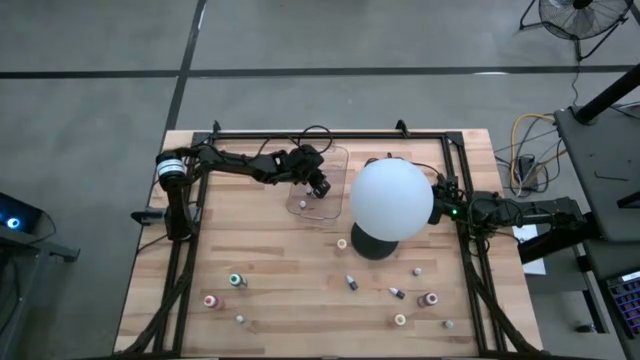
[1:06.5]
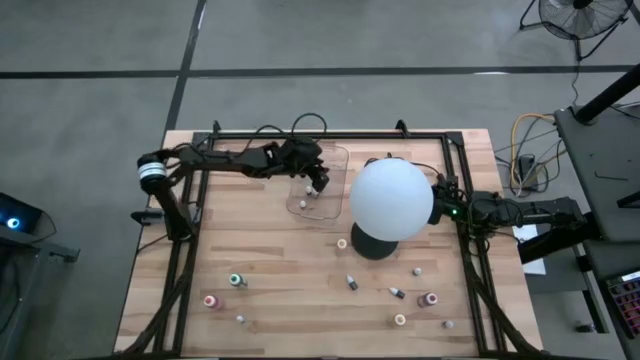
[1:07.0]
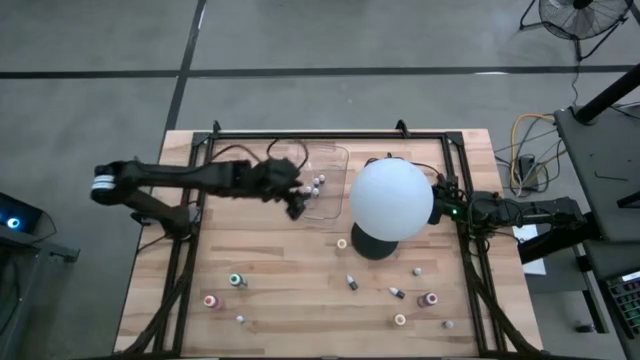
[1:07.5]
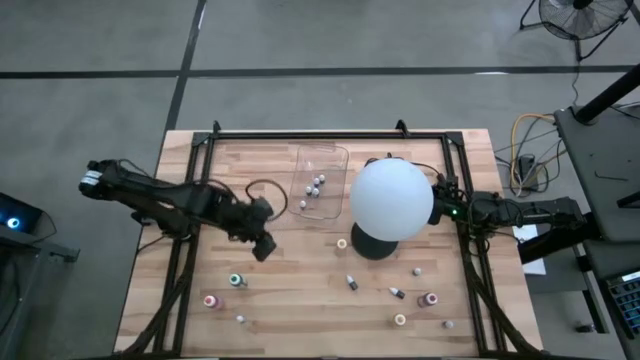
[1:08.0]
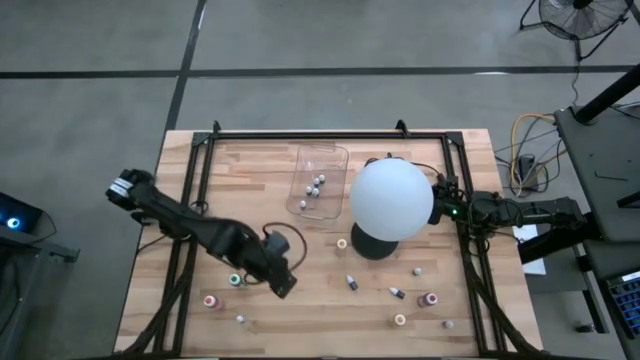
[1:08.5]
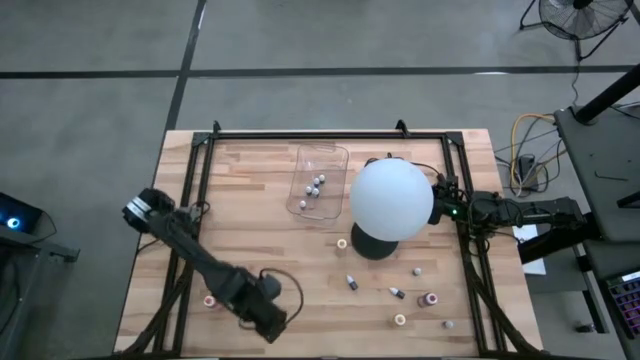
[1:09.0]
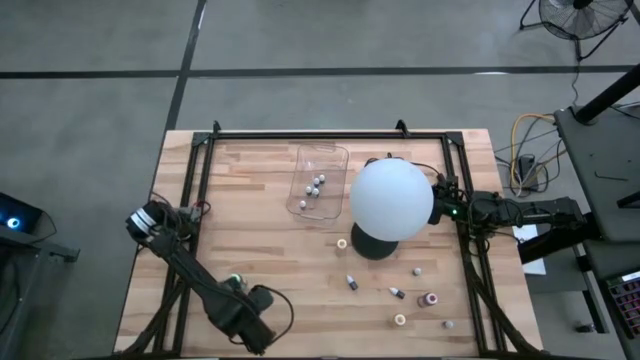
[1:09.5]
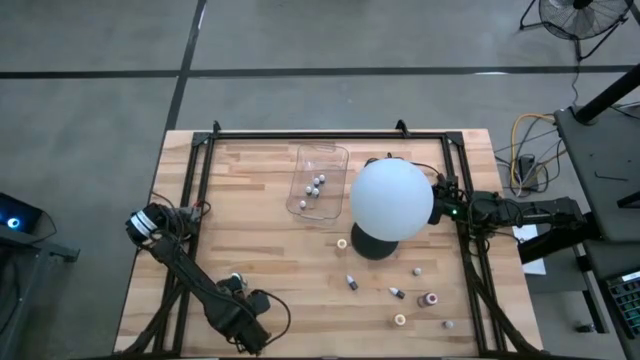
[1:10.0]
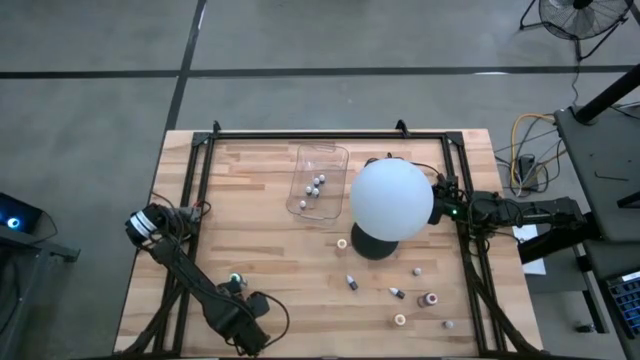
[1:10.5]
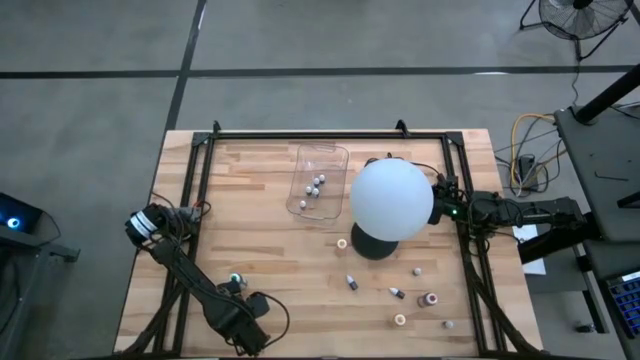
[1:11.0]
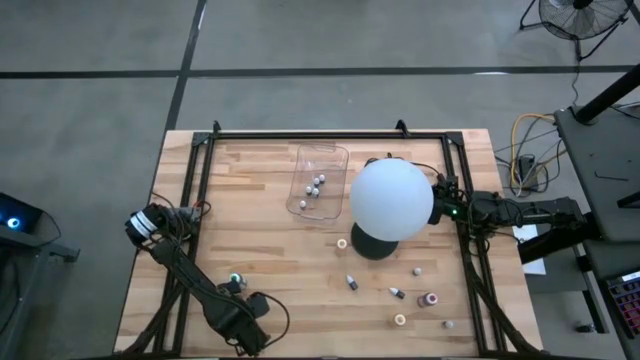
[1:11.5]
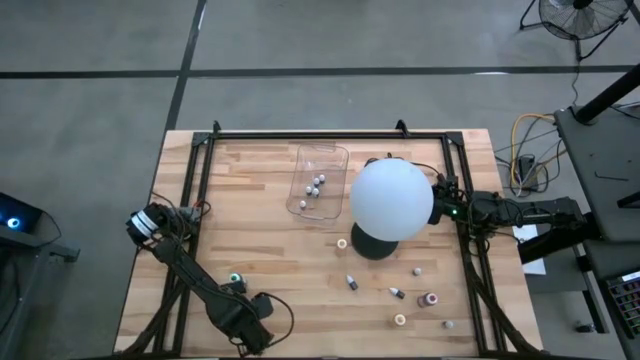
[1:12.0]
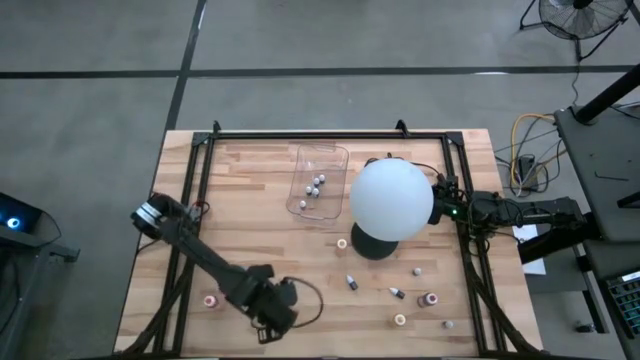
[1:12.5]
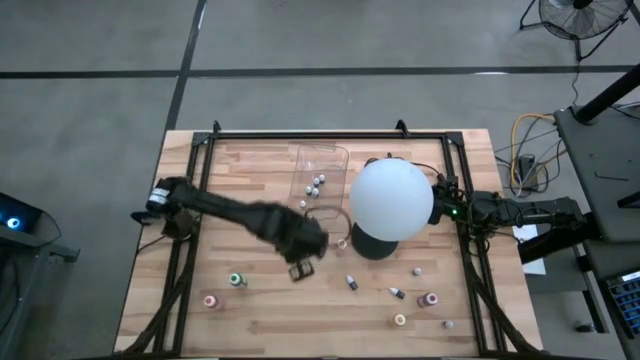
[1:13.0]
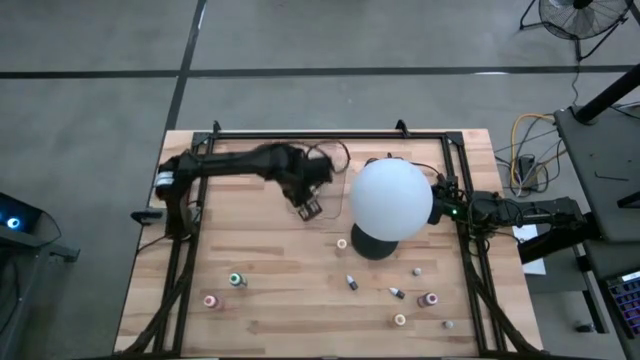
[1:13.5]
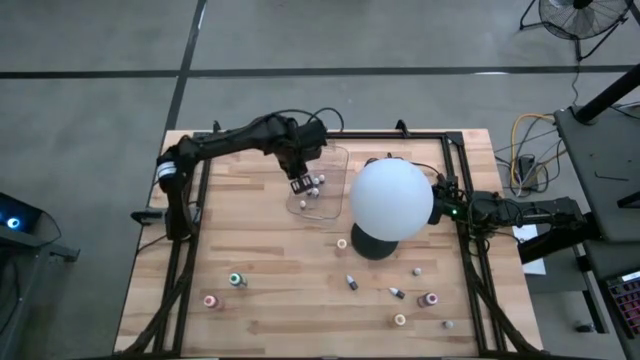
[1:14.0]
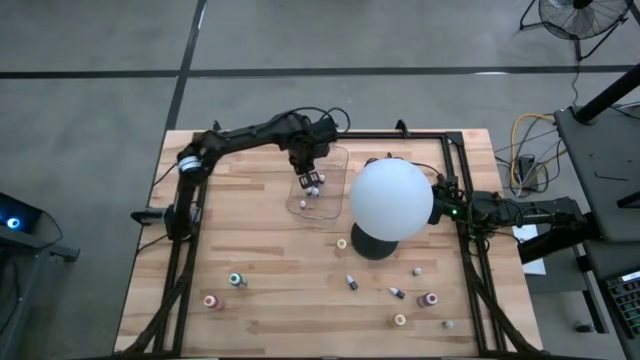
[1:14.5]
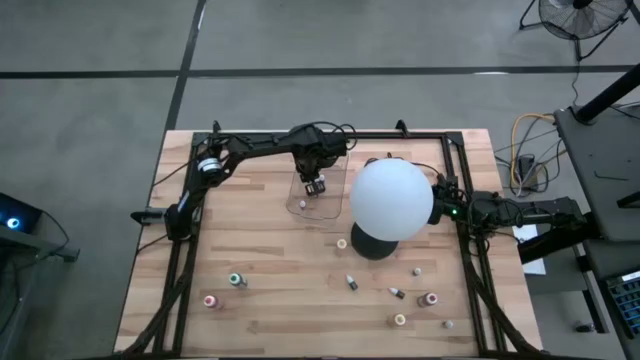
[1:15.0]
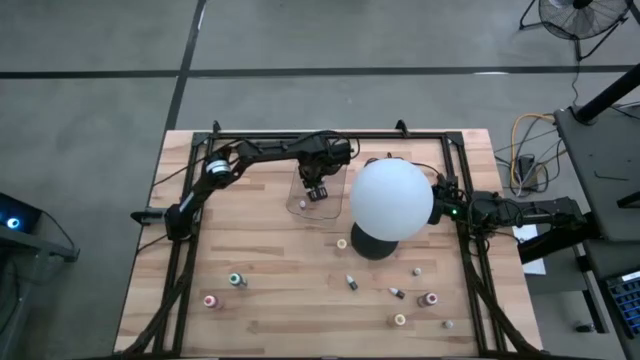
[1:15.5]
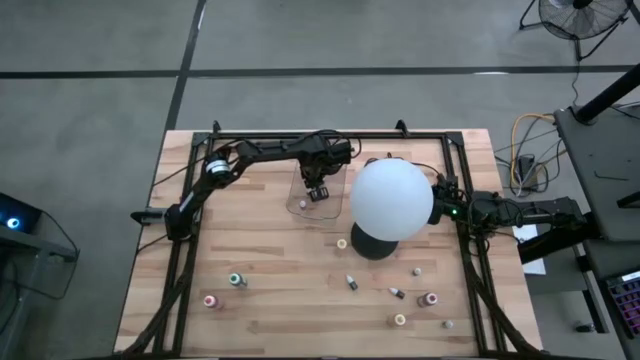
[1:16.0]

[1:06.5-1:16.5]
Task: Pick & Place food coloring
Put the small white food coloring bottle into the transparent bin

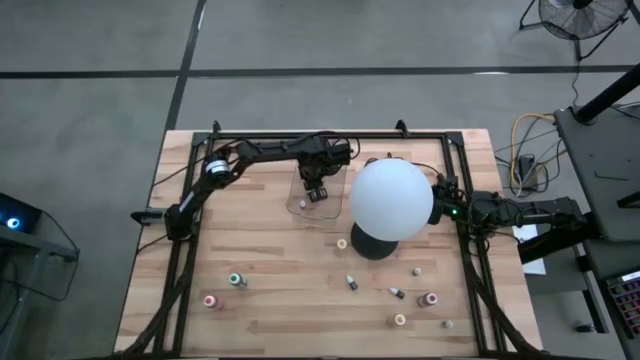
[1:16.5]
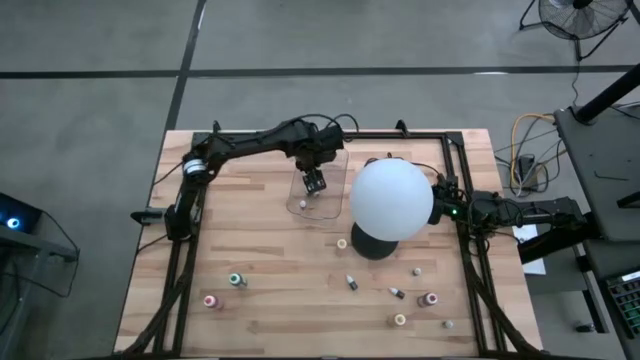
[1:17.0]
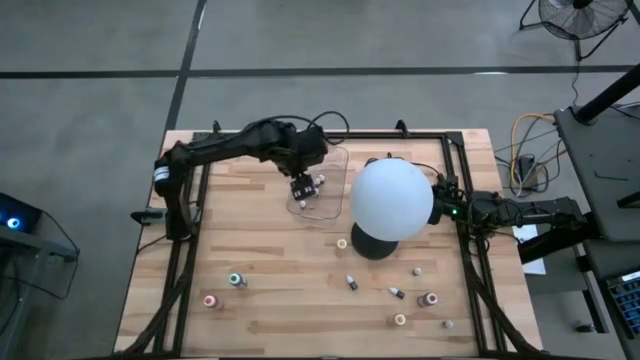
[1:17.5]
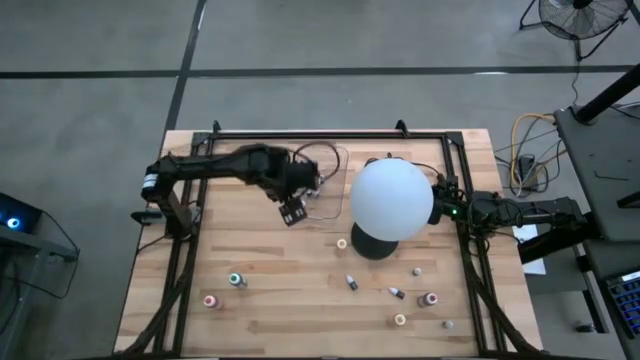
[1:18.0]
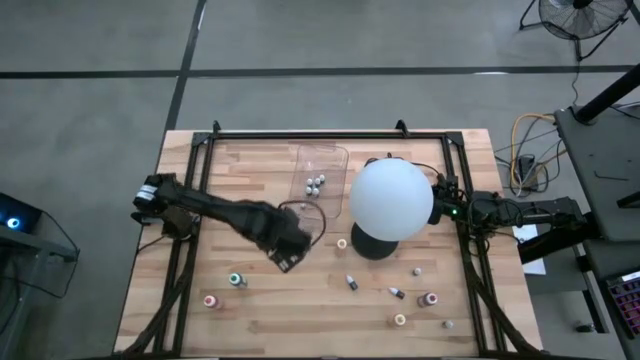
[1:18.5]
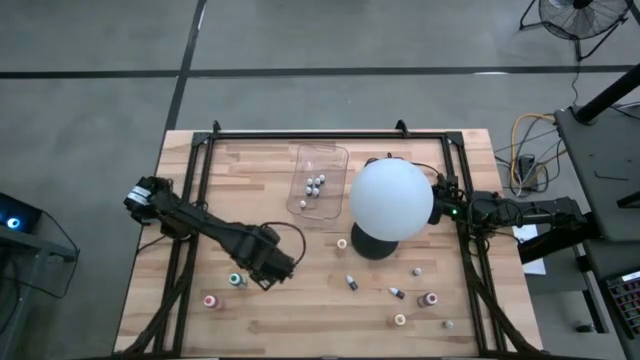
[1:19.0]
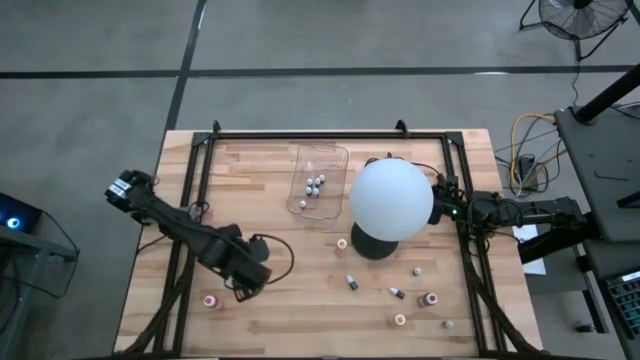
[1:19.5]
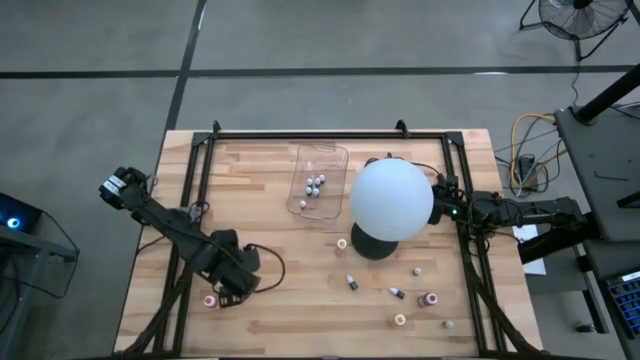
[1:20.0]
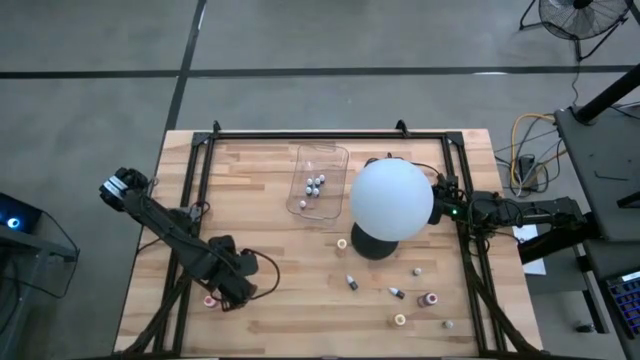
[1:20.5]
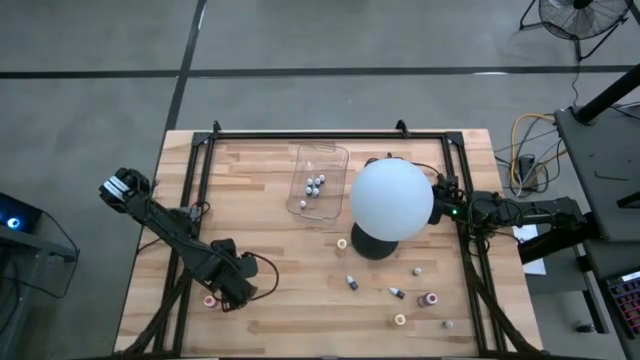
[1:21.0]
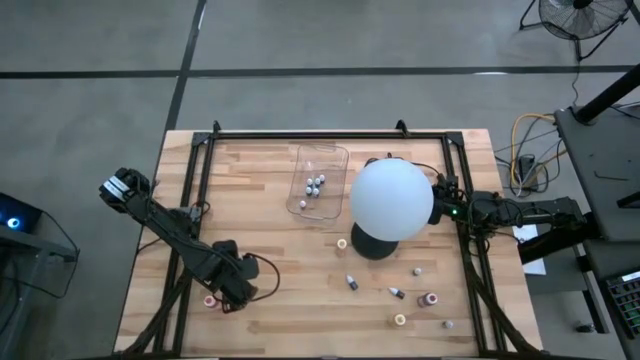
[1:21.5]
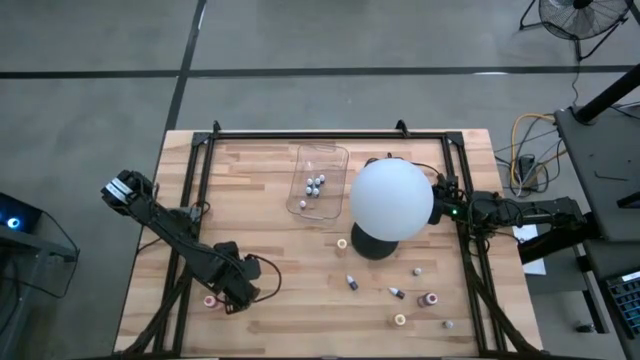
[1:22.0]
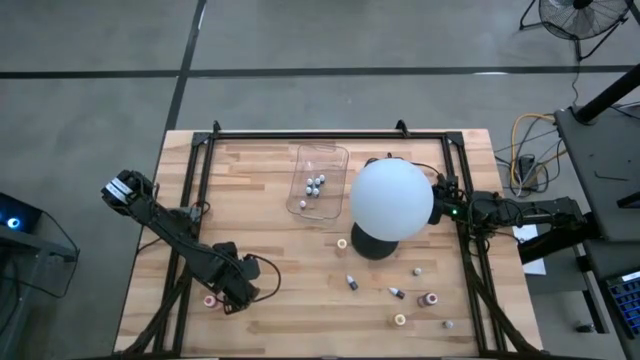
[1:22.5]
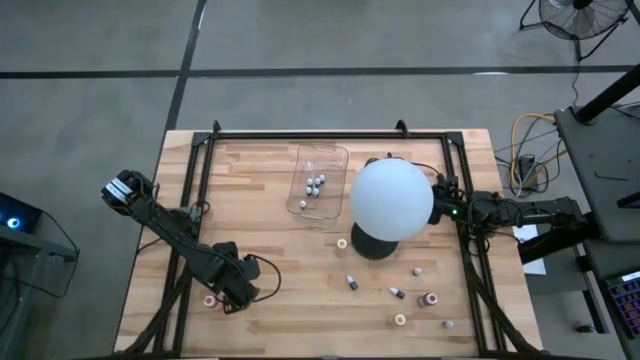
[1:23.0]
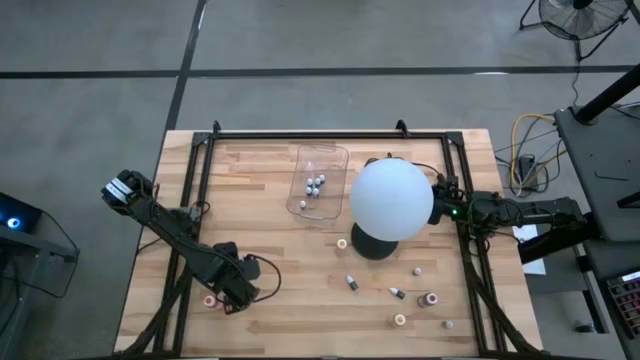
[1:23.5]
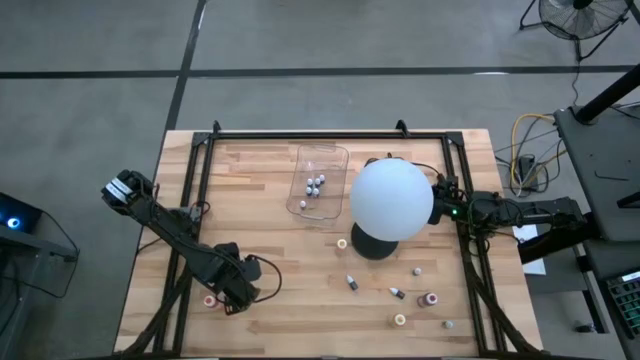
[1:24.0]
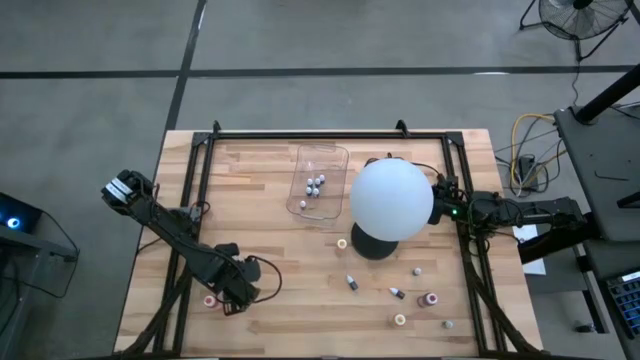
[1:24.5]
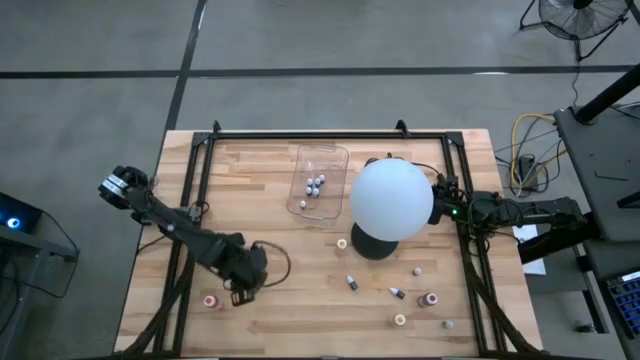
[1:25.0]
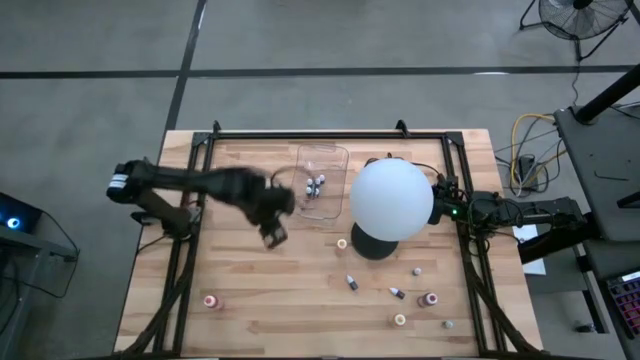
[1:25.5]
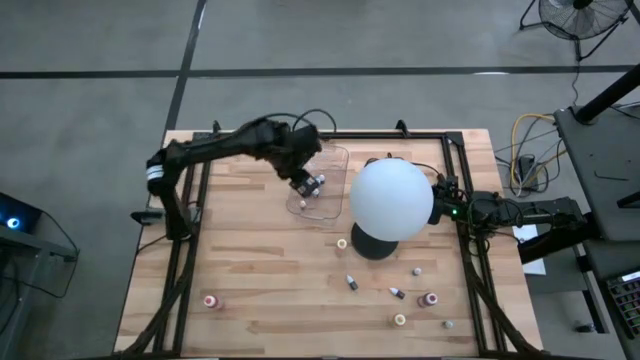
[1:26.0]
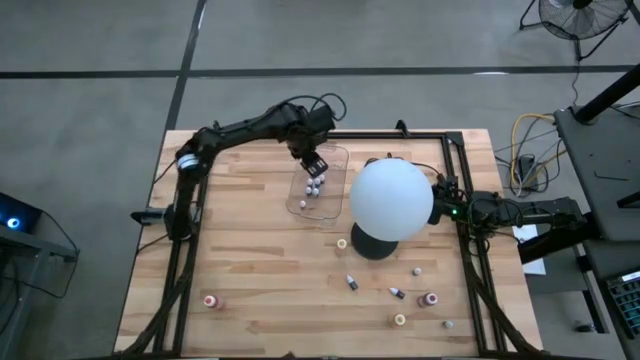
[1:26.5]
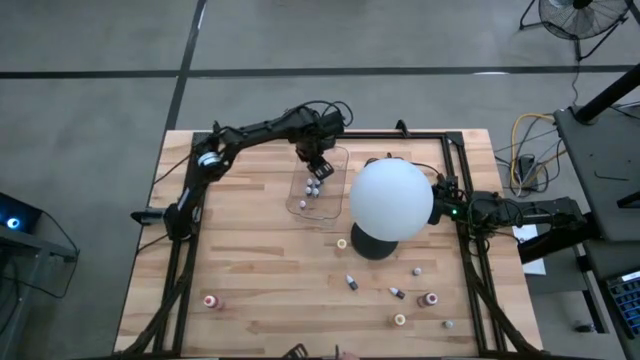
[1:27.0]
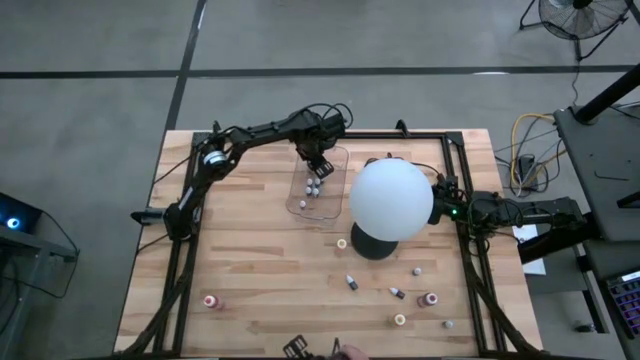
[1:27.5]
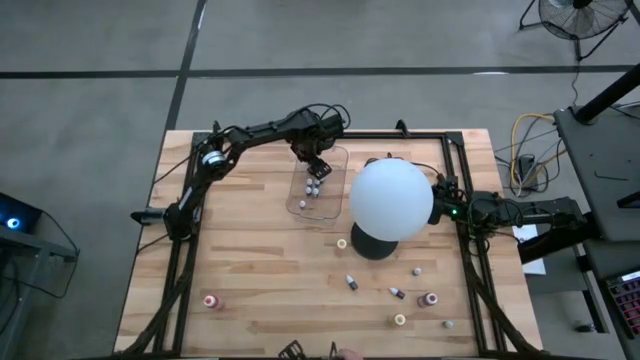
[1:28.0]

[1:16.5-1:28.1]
Put the large green food coloring bottle into the transparent bin
